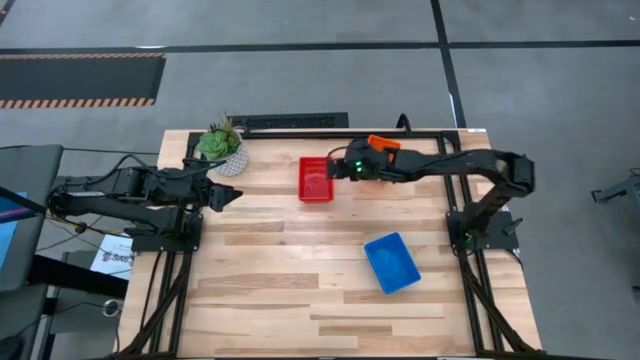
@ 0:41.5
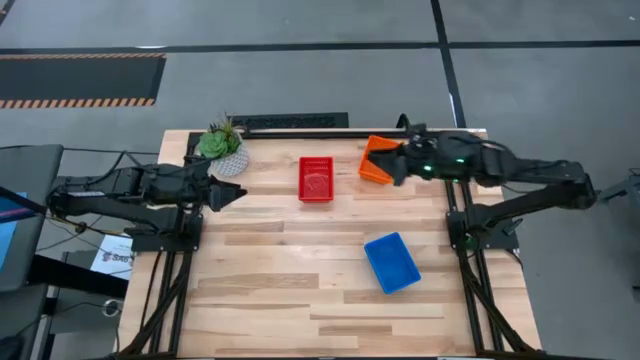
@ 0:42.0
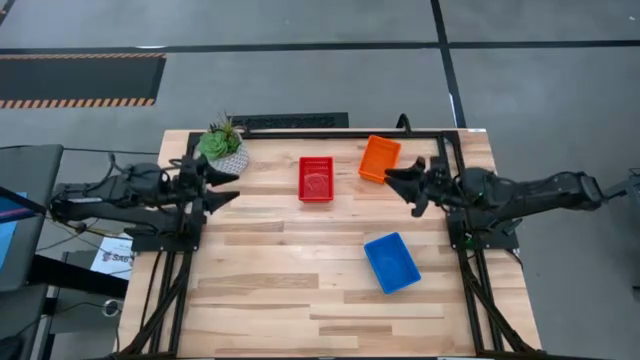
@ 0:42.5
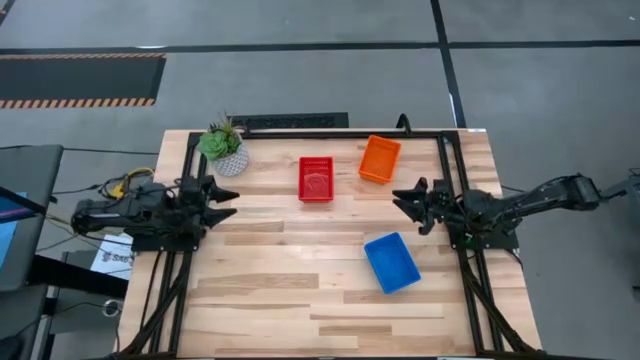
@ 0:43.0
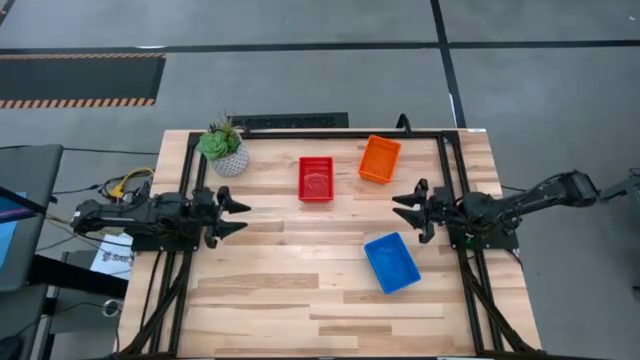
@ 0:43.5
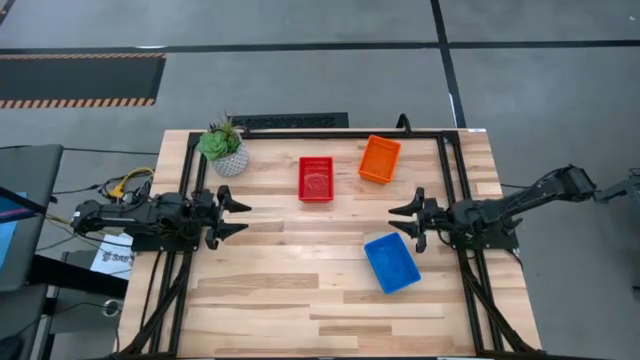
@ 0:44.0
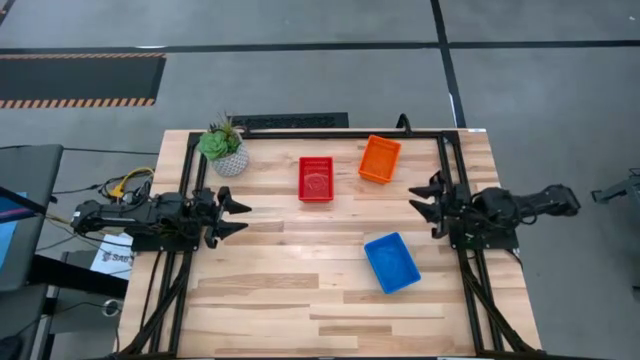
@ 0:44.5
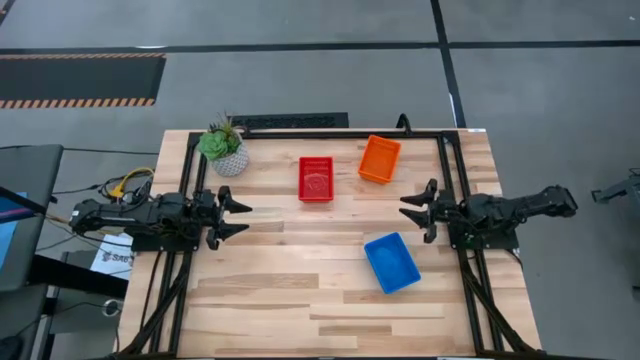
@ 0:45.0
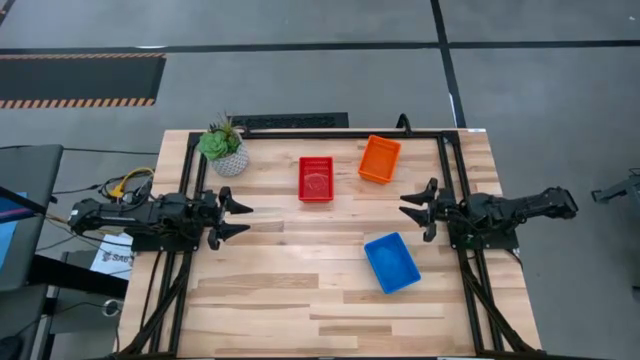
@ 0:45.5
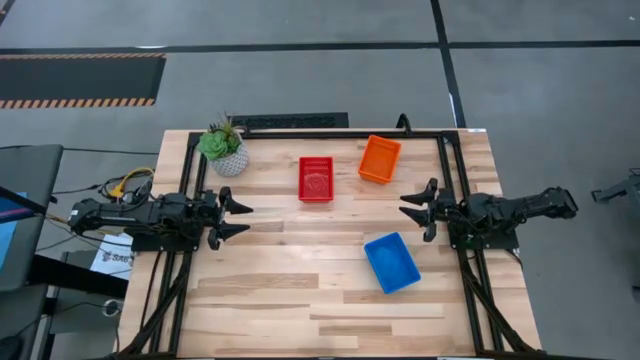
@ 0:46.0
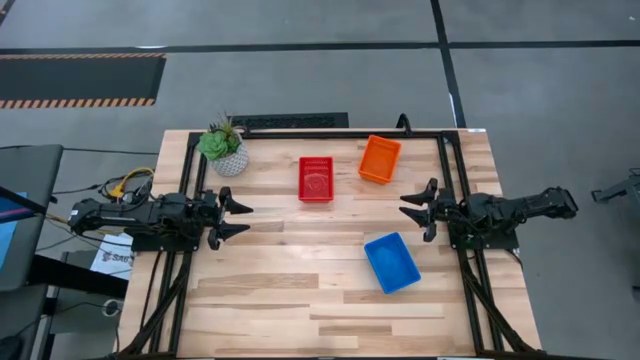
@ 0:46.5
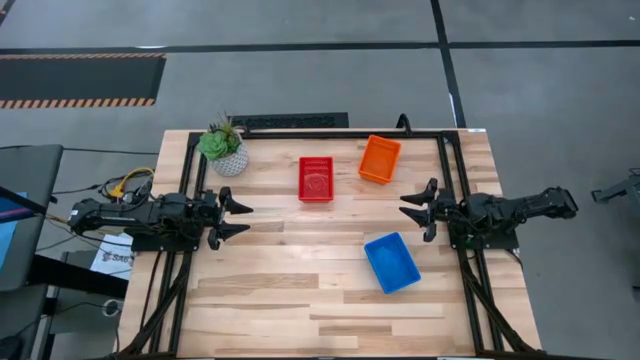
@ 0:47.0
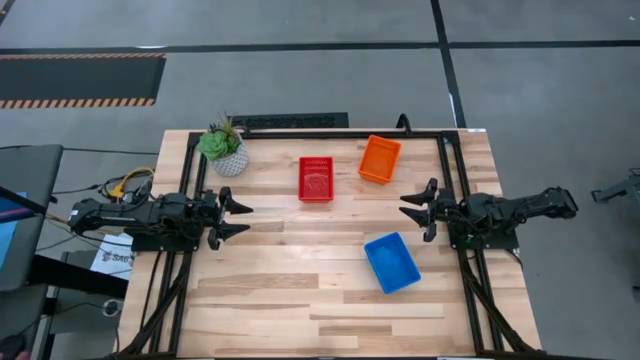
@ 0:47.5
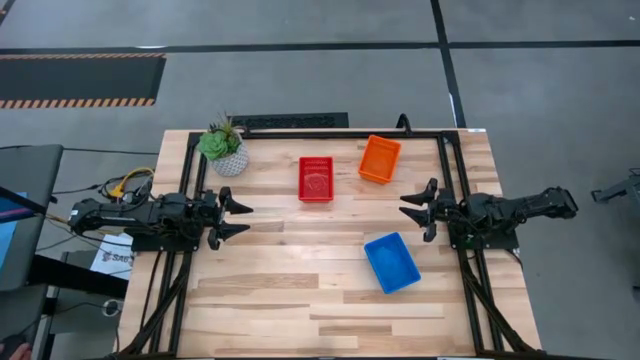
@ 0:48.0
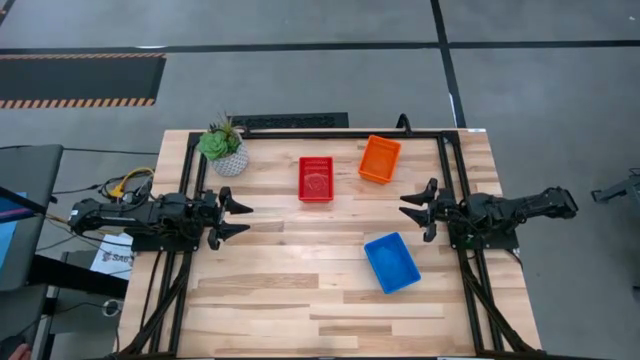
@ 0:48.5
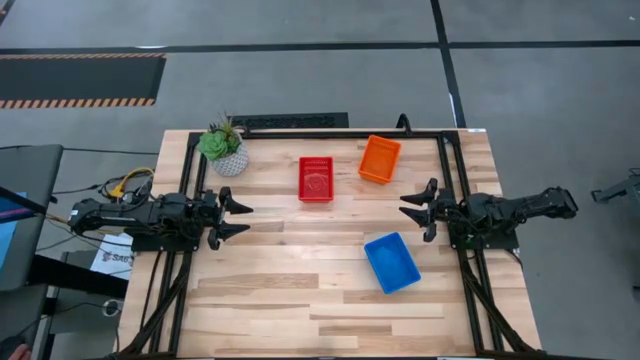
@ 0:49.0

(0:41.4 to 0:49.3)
Return to Home Position

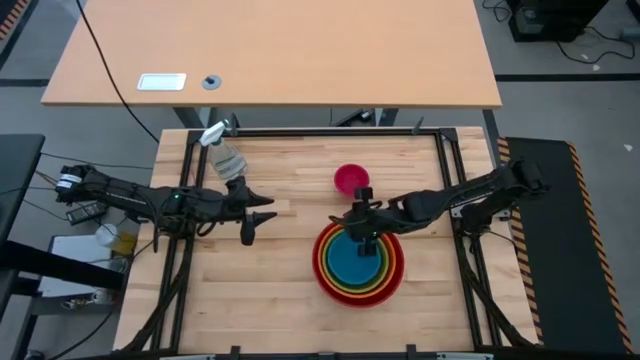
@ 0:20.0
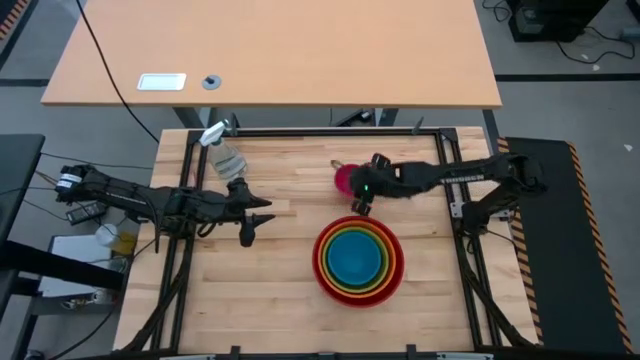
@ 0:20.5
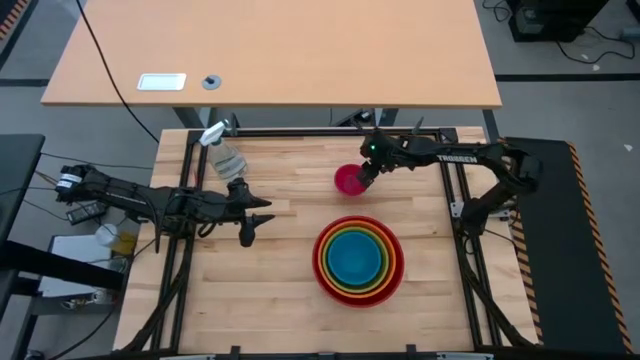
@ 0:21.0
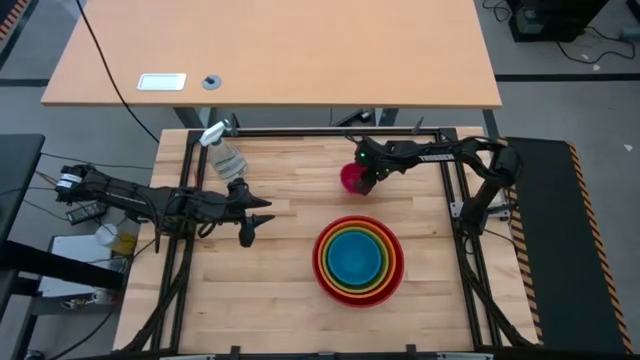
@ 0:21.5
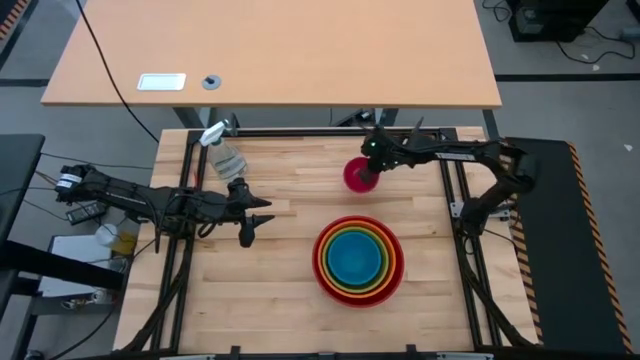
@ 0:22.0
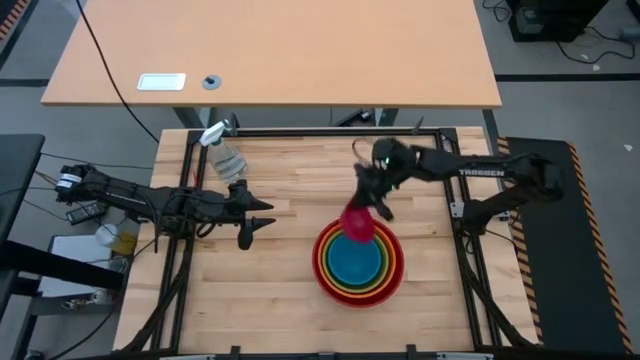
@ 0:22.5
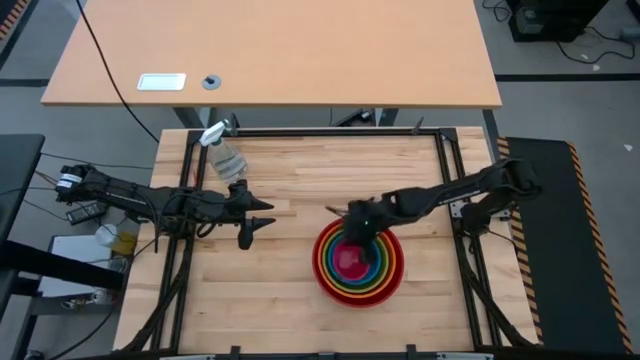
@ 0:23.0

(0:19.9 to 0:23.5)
Stack the pink bowl on top of the blue bowl

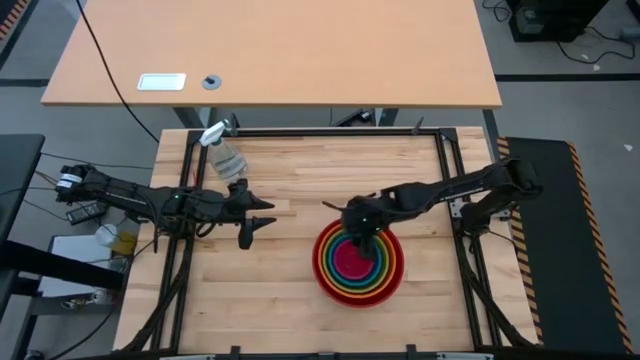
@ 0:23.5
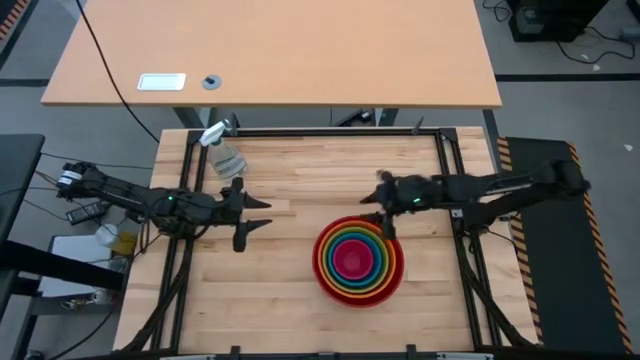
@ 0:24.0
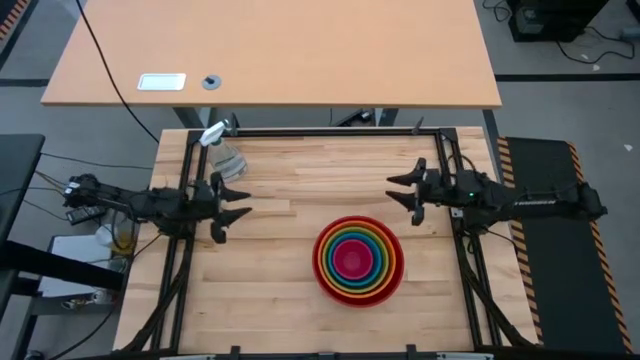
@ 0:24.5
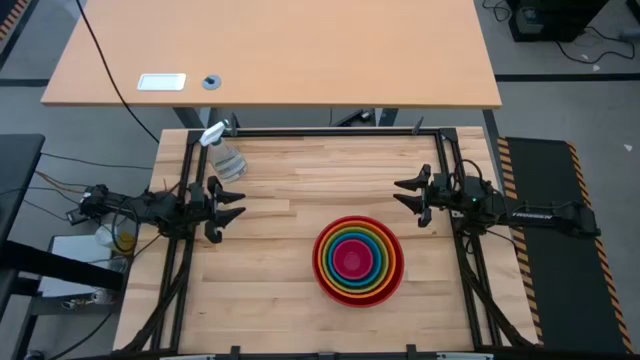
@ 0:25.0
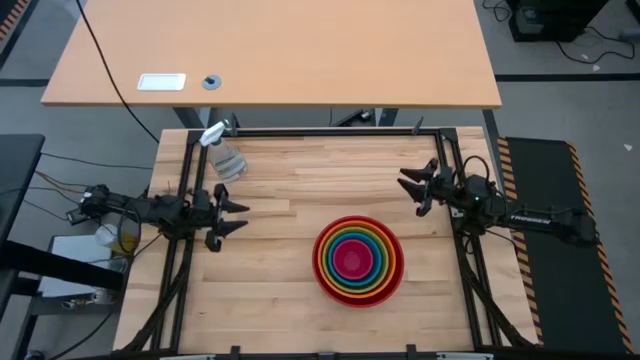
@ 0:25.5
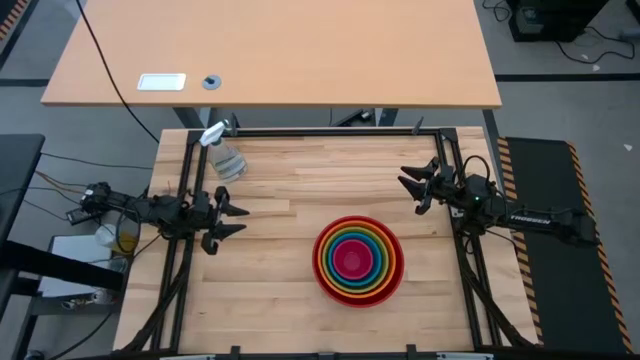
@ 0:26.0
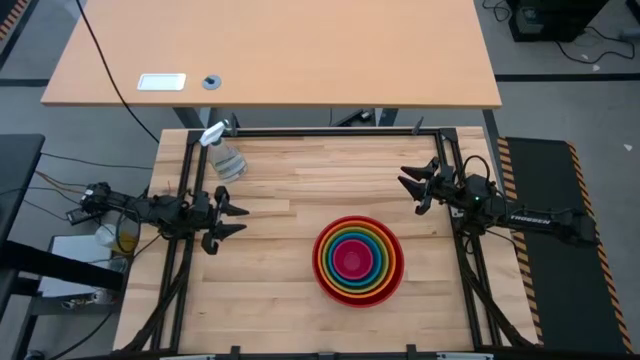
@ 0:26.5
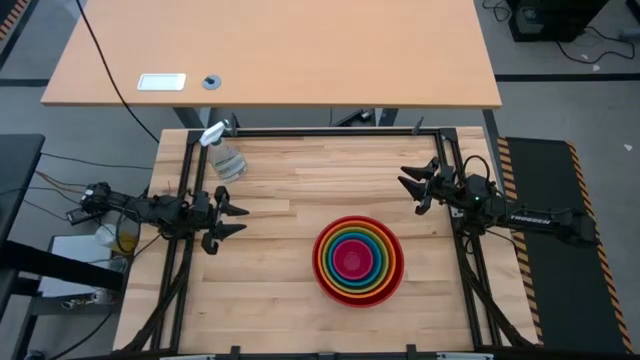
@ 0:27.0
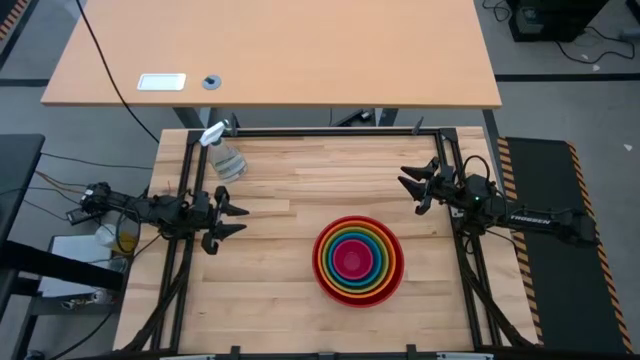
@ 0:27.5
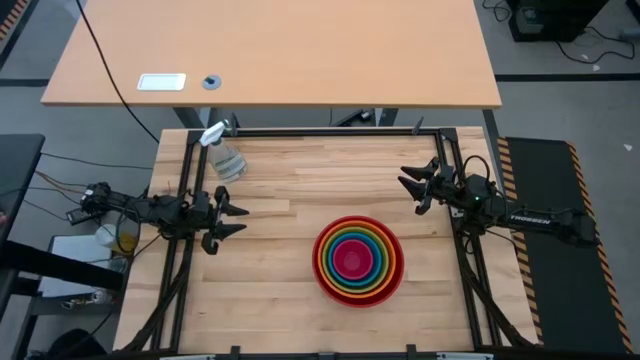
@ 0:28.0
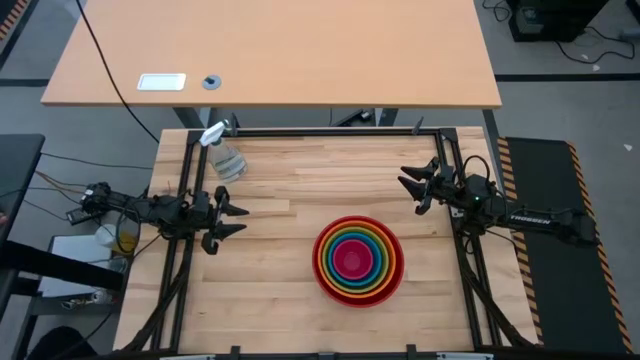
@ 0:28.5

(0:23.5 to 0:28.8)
Return to Home Position
